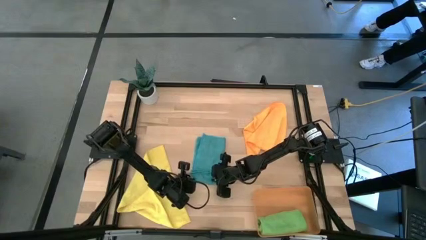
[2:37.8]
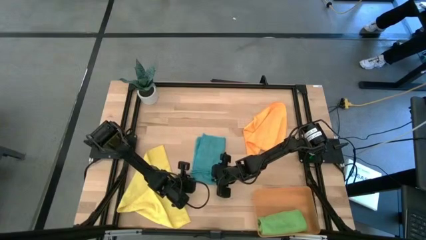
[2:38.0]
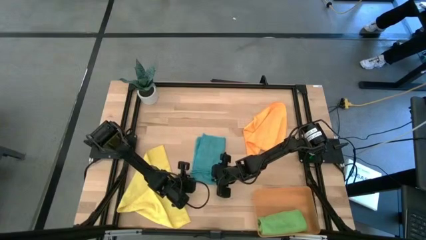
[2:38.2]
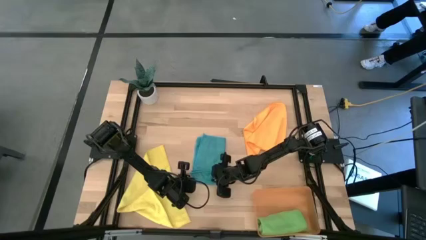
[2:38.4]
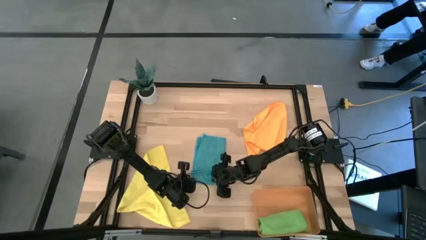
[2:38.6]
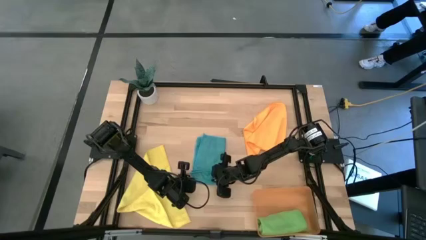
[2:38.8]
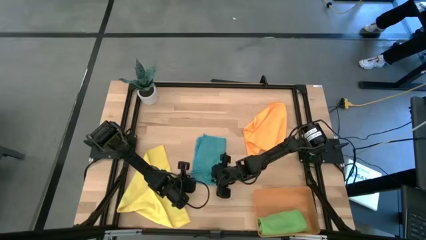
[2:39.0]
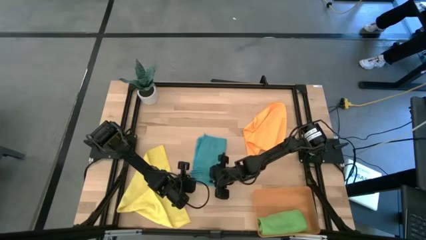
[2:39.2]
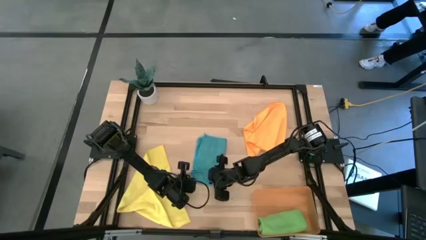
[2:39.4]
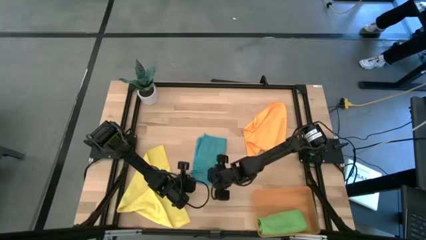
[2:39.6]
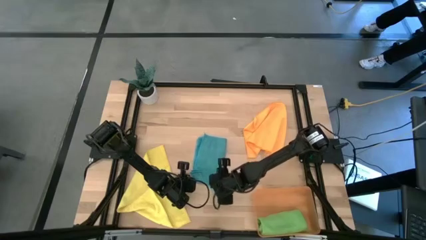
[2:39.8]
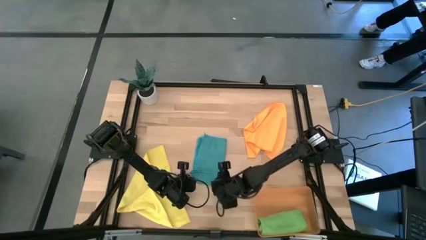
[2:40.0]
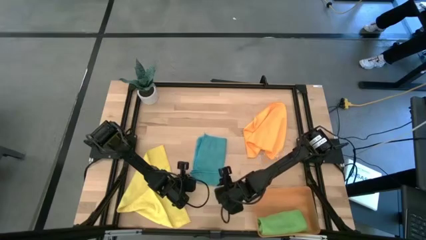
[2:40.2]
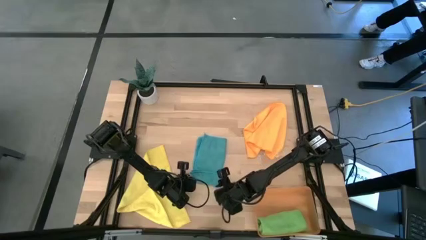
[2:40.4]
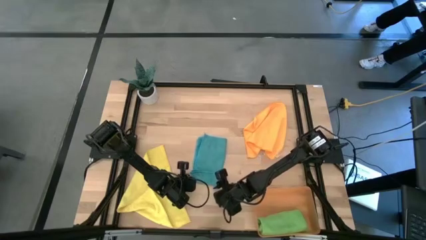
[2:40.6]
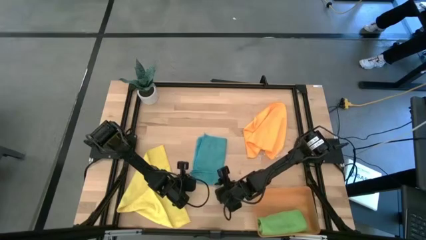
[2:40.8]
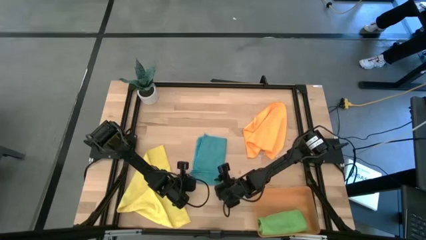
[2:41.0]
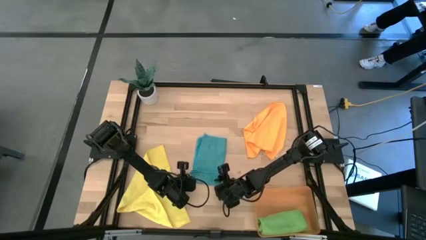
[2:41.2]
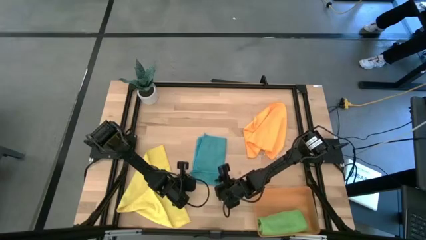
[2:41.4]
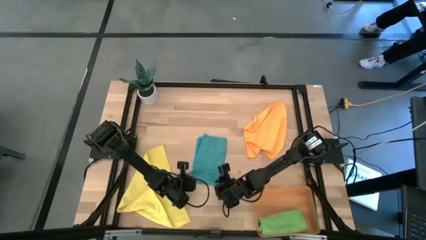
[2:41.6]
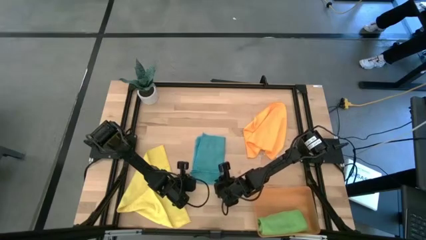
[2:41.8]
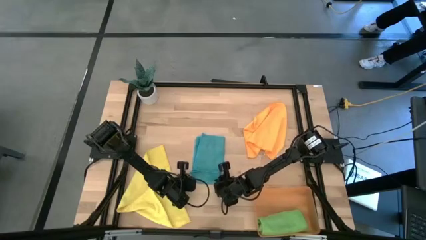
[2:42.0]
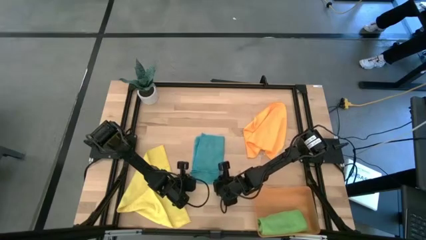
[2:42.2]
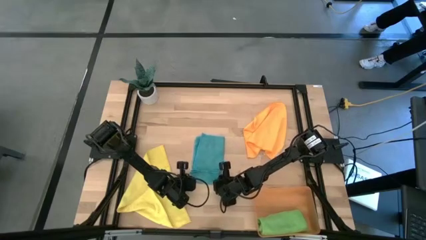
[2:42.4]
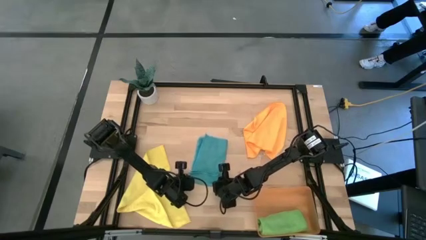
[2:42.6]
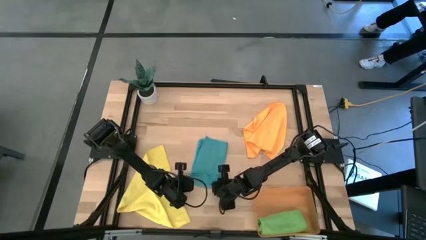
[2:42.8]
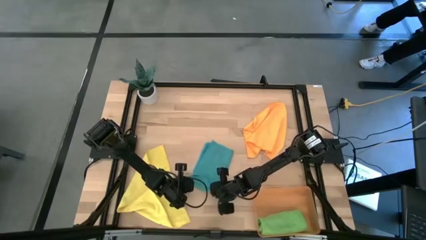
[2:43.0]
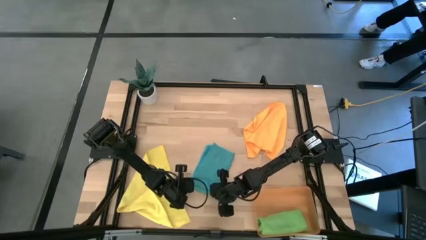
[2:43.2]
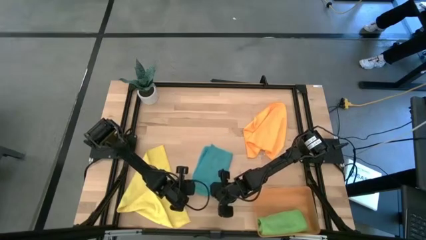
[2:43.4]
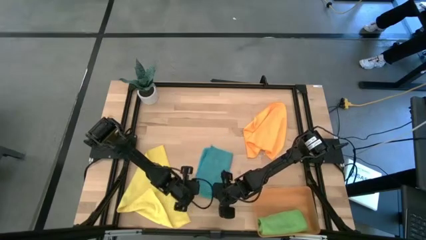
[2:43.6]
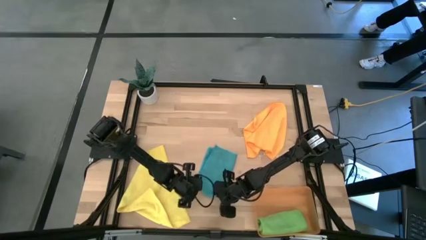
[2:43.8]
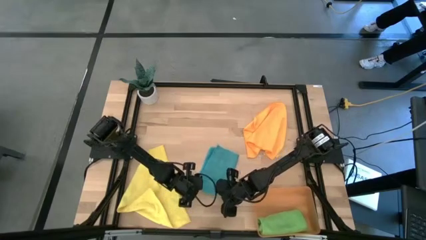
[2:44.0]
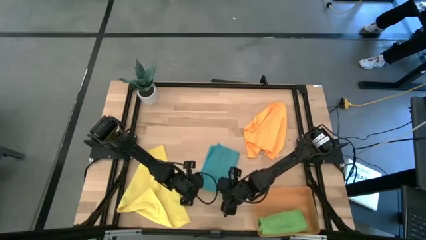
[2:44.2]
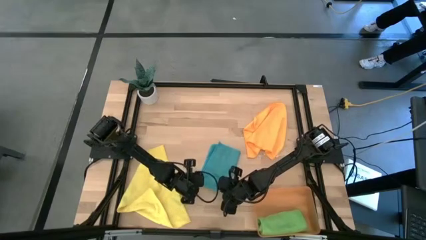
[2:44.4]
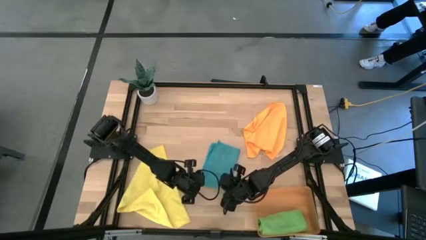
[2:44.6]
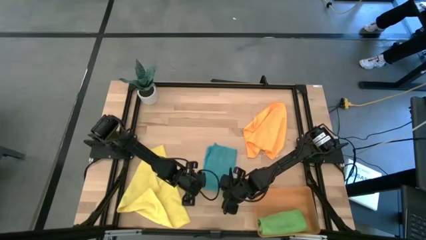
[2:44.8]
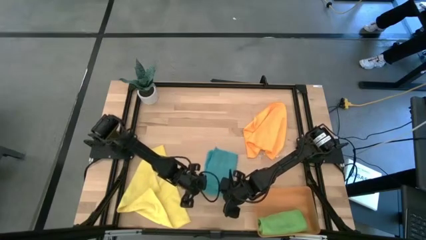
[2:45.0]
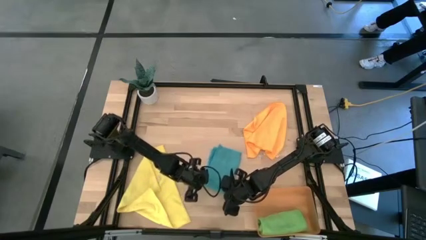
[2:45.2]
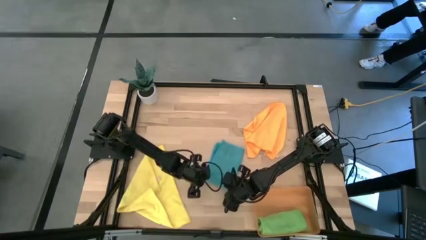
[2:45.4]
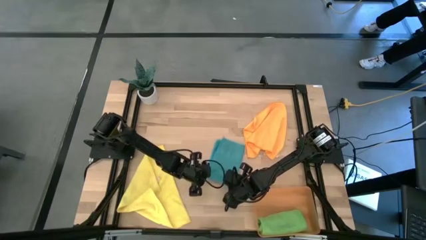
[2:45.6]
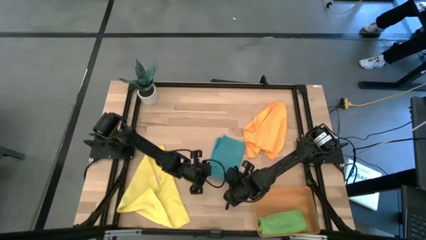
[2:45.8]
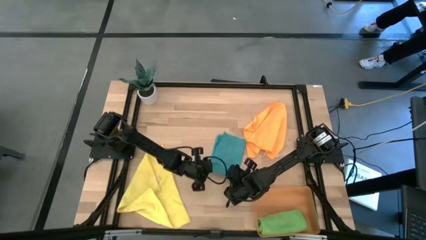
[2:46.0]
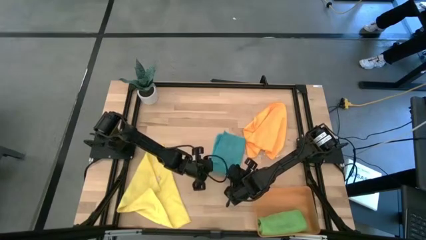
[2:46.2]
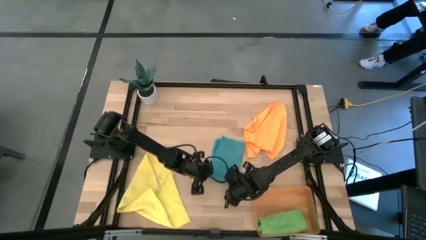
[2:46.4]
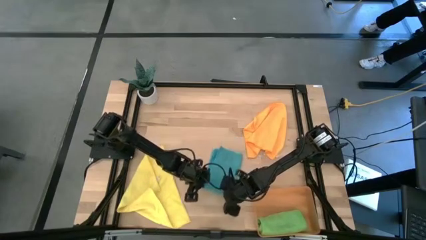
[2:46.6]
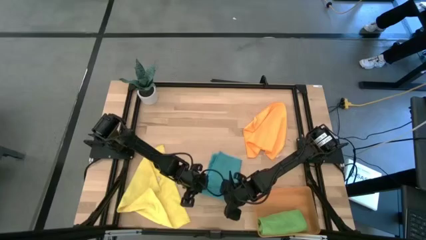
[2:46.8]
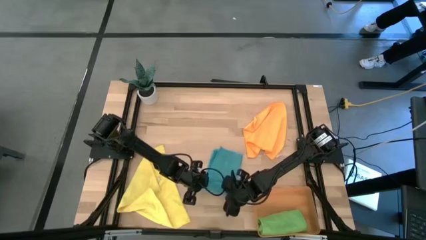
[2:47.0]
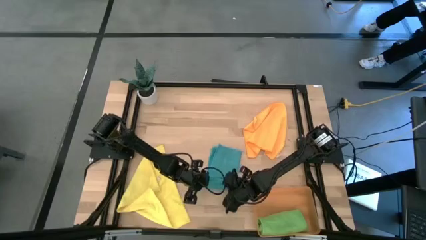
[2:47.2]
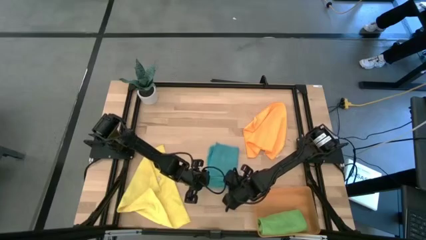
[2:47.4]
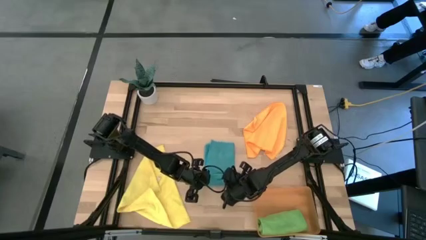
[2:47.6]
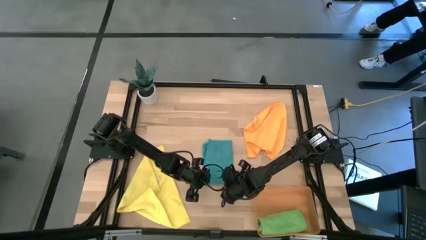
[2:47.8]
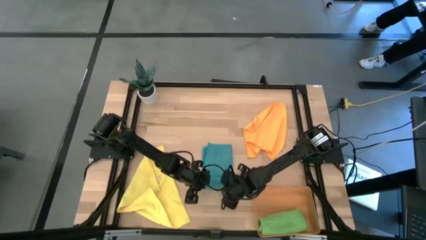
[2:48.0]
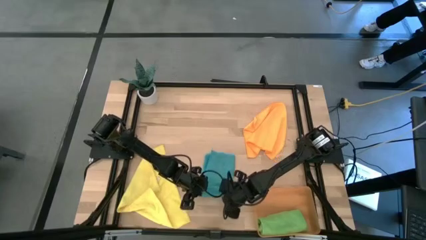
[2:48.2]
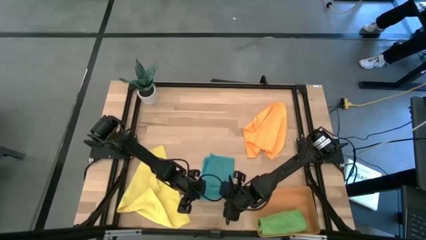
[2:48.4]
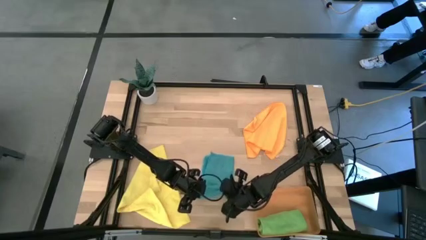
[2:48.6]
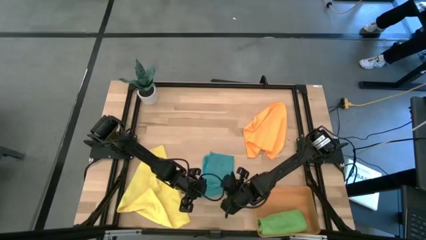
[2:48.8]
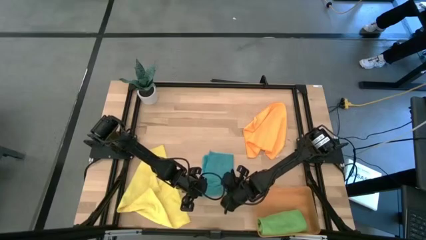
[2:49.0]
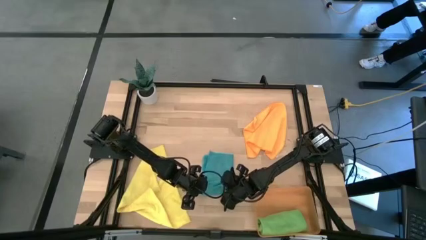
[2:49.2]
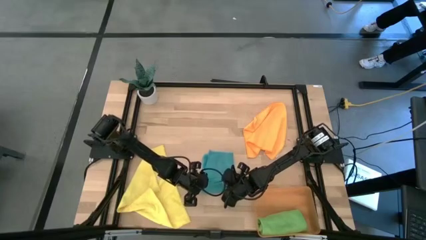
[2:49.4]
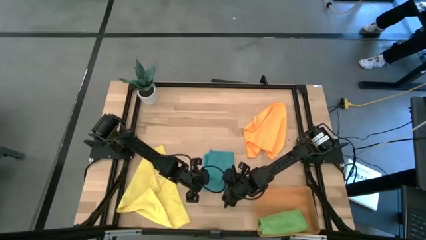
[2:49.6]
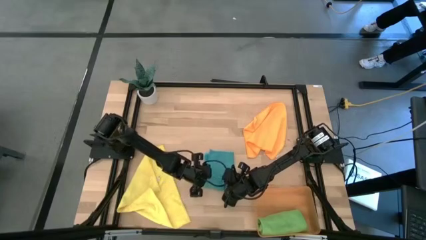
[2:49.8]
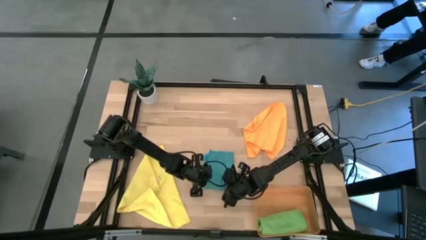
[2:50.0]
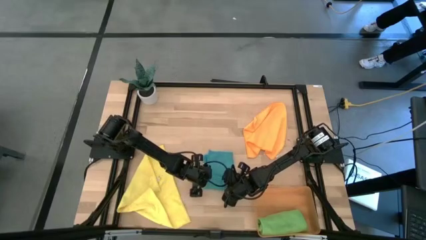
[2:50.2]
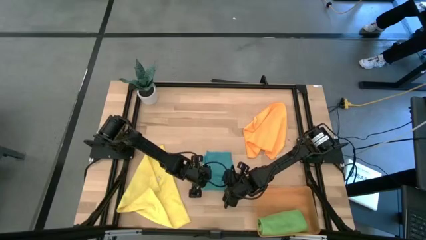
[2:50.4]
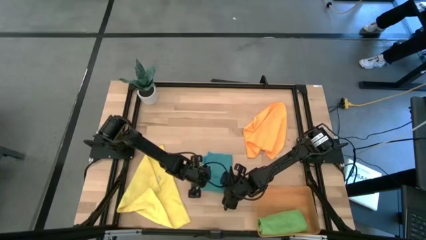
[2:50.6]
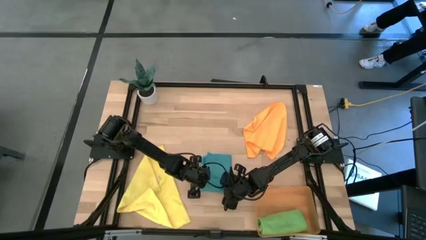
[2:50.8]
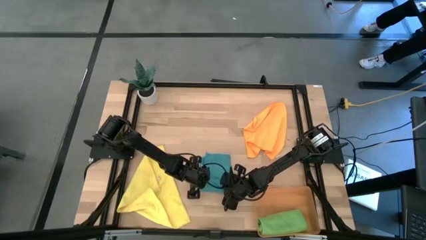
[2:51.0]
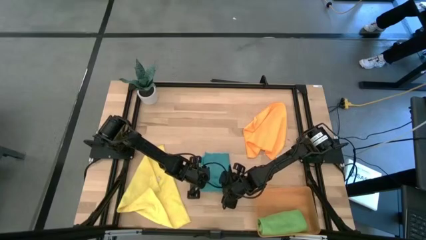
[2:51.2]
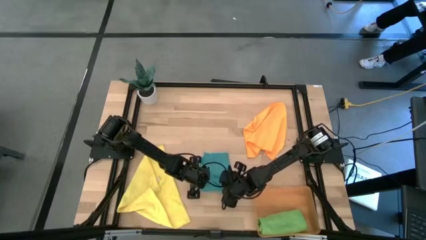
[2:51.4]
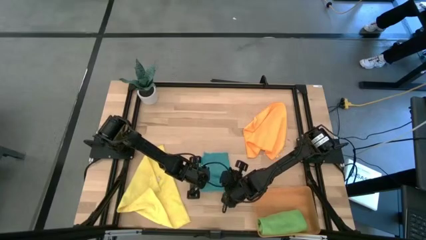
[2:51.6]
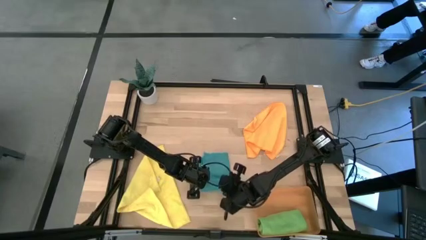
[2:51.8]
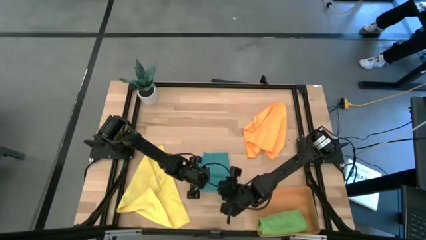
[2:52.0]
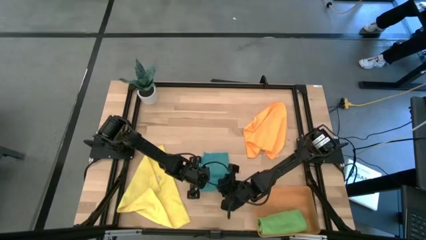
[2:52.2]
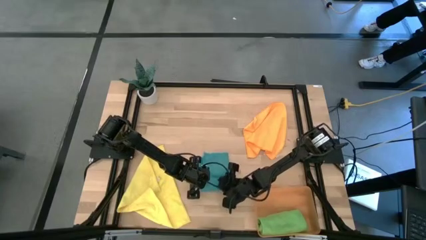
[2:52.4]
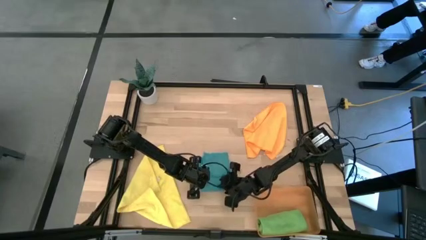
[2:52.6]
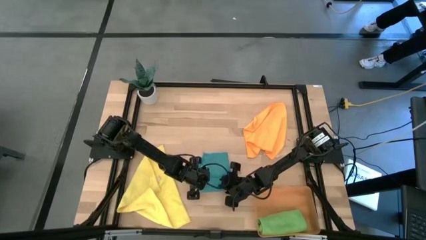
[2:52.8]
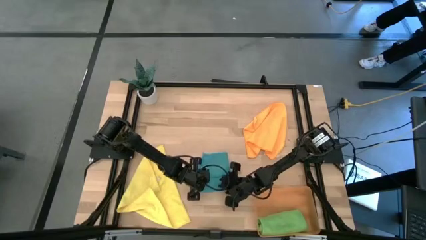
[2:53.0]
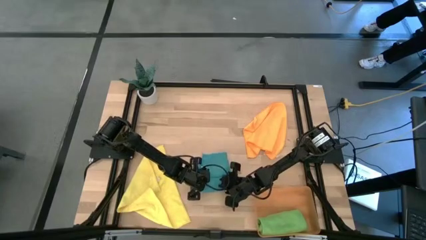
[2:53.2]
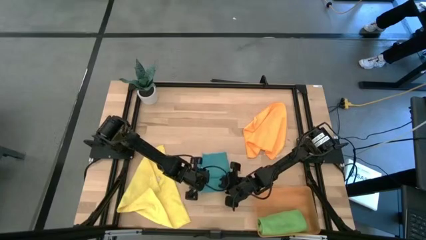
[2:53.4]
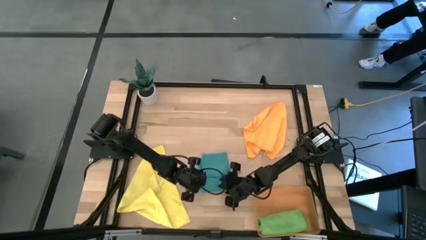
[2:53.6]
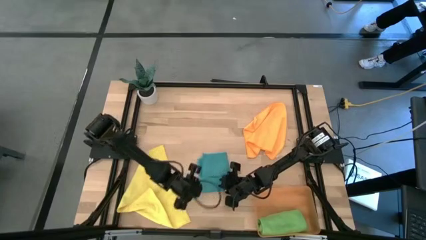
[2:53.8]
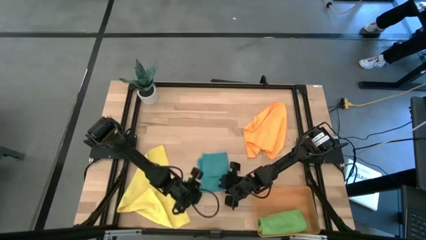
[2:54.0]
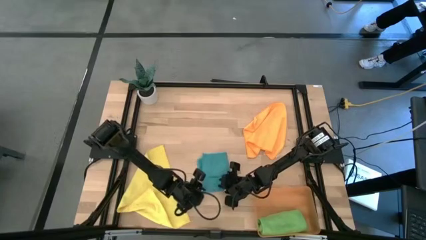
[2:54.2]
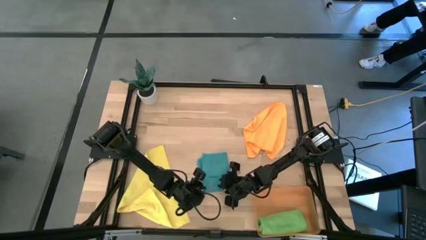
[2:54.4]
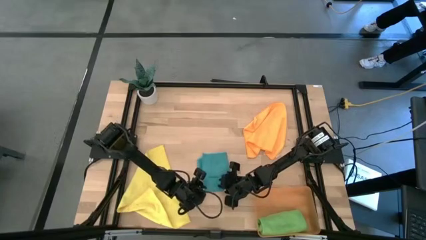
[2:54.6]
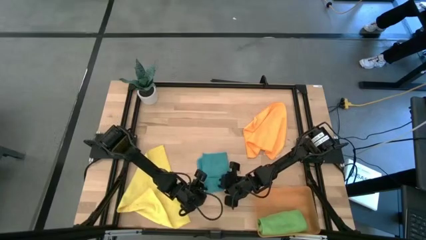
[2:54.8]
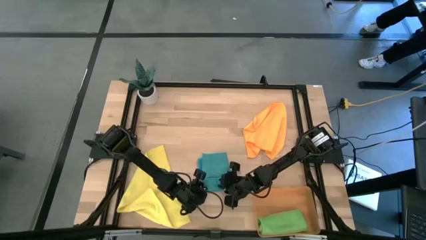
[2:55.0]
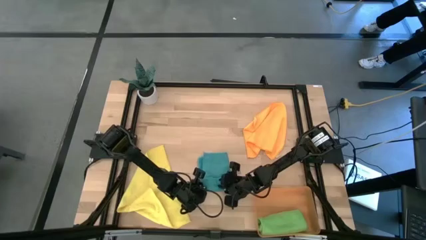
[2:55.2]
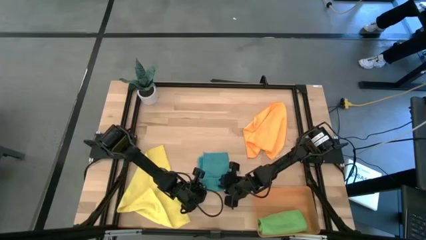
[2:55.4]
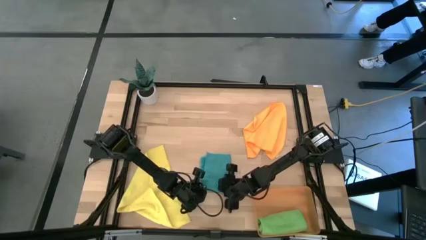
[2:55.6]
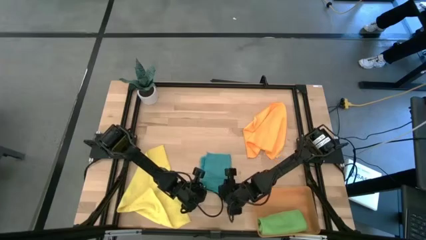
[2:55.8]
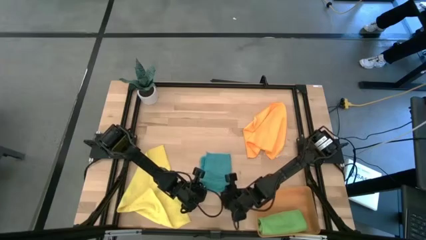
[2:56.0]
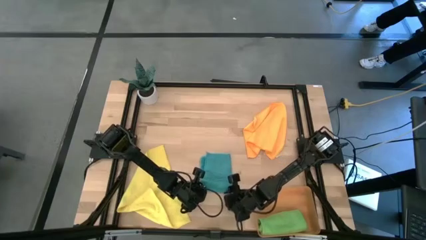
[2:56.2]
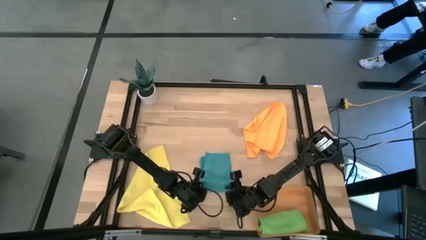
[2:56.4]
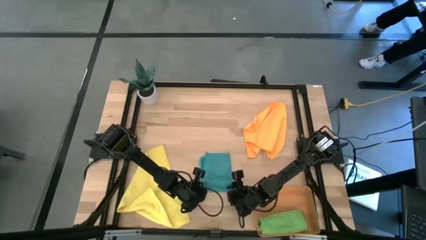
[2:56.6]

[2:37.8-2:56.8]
Task: Roll microfiber towels into tight, uniform cylinder then place into a basket
Roll the blue microfiber towel
